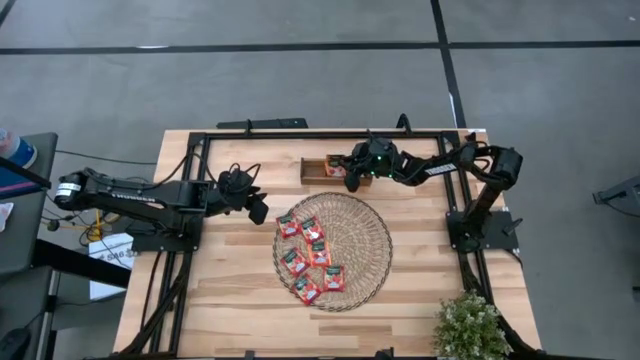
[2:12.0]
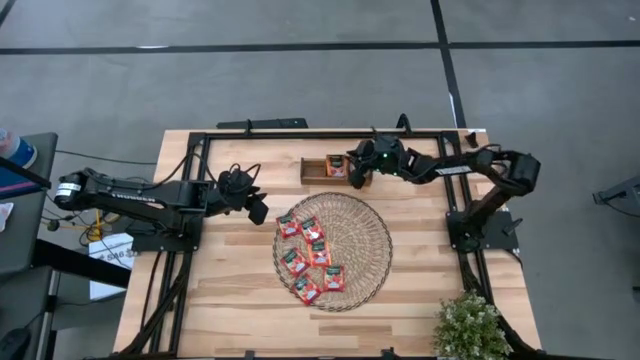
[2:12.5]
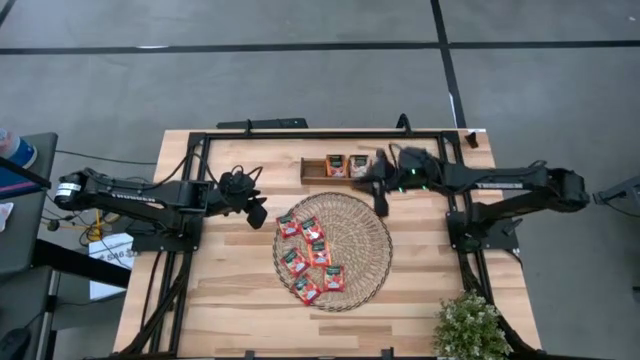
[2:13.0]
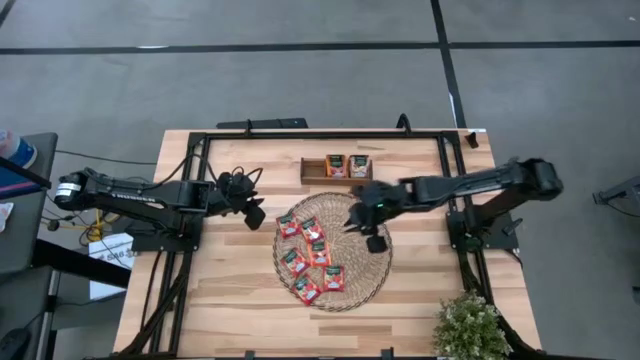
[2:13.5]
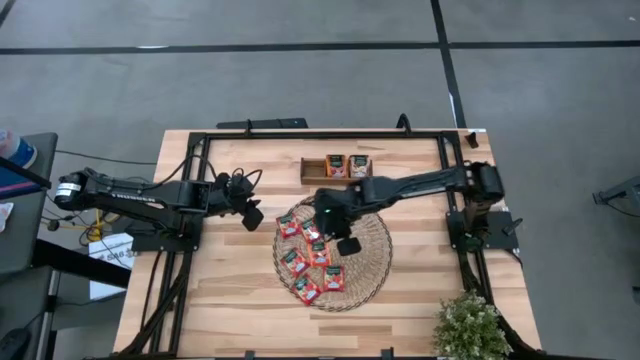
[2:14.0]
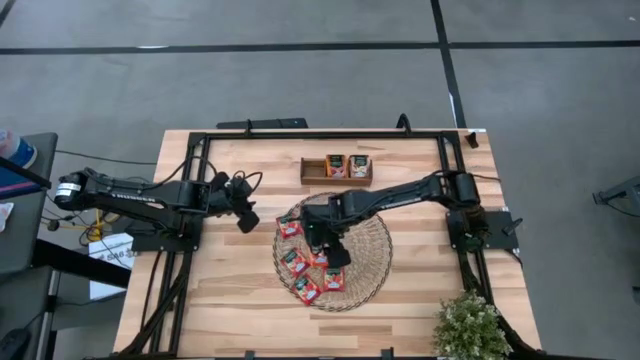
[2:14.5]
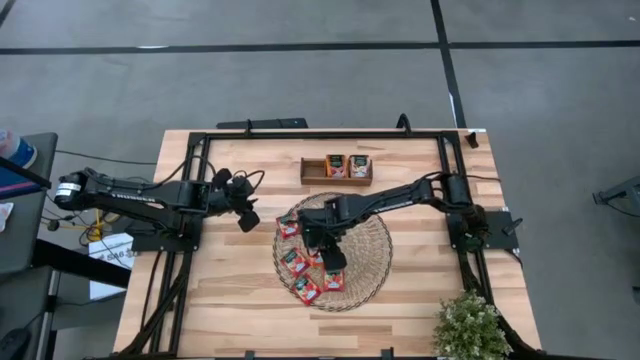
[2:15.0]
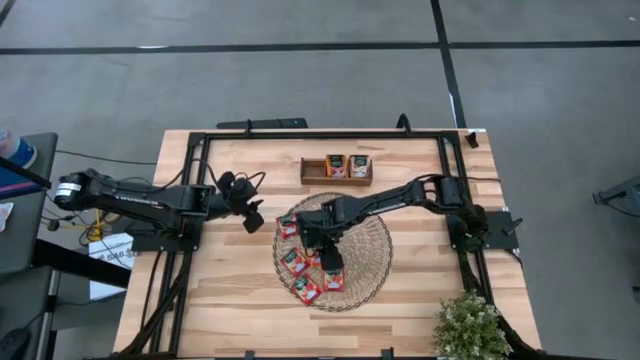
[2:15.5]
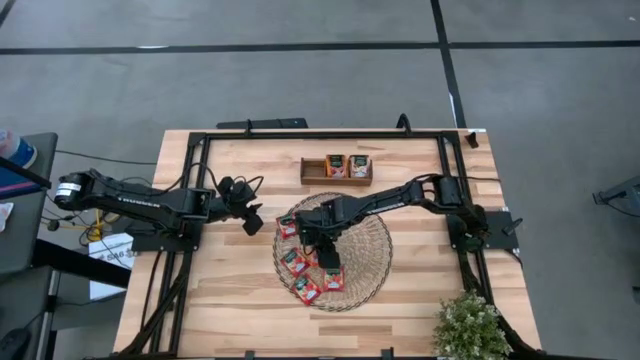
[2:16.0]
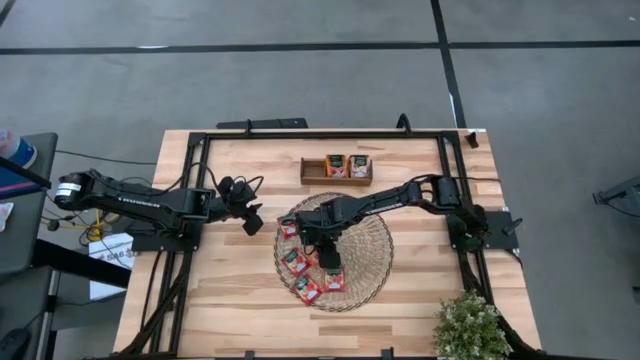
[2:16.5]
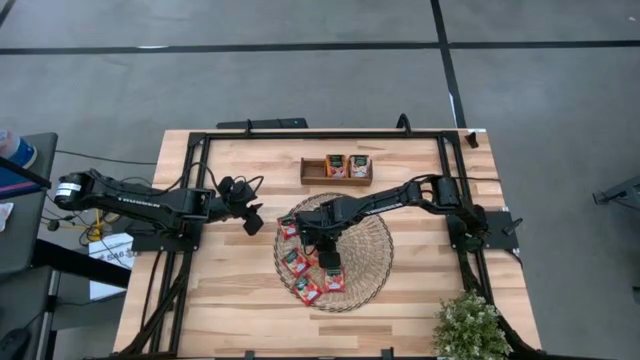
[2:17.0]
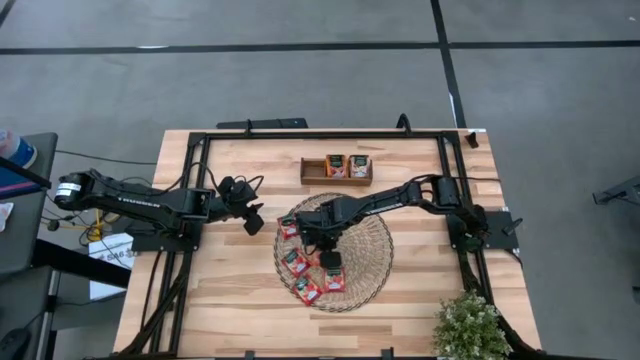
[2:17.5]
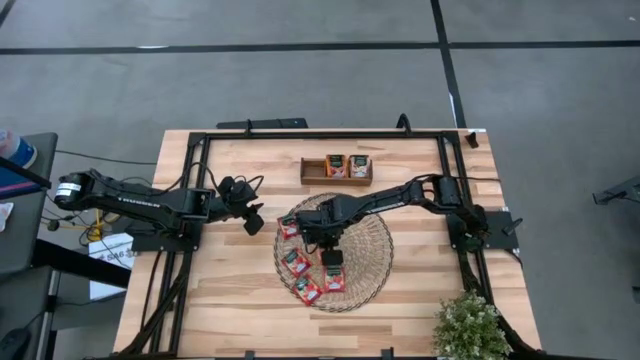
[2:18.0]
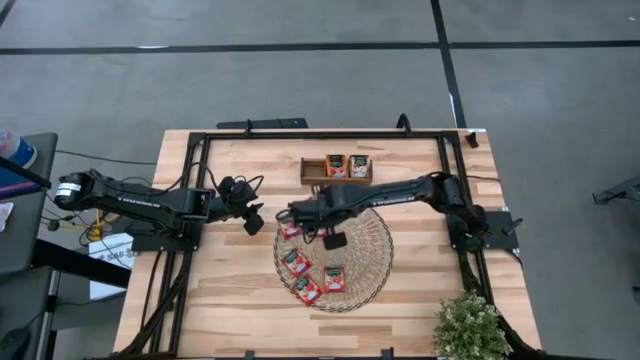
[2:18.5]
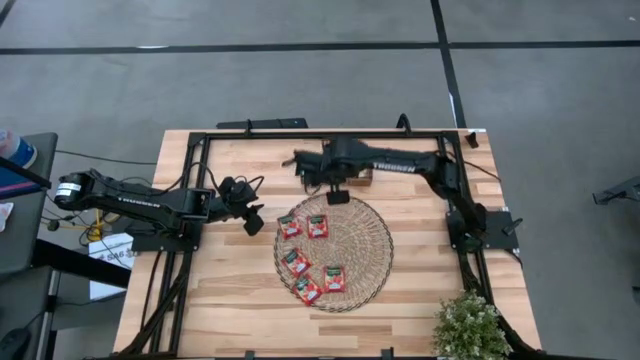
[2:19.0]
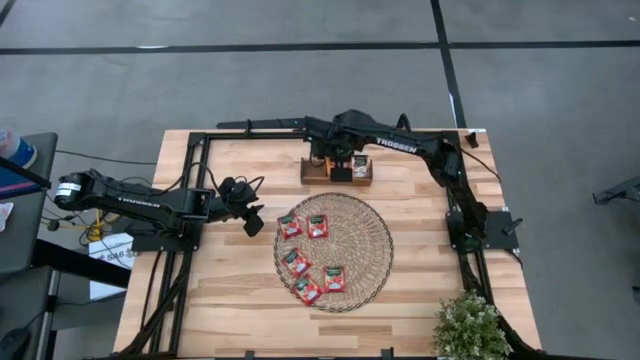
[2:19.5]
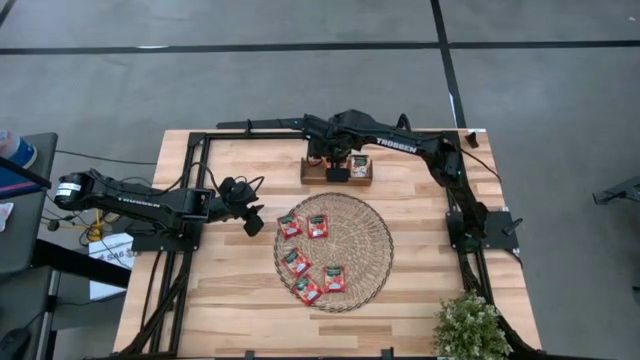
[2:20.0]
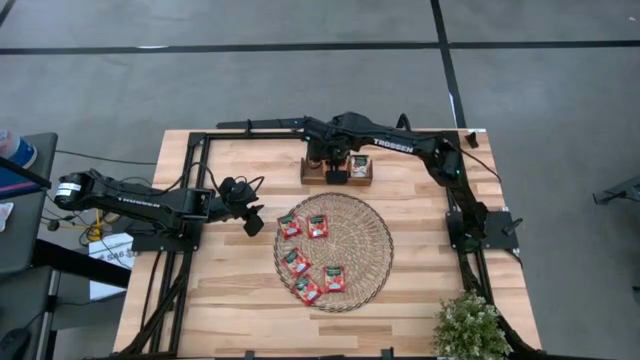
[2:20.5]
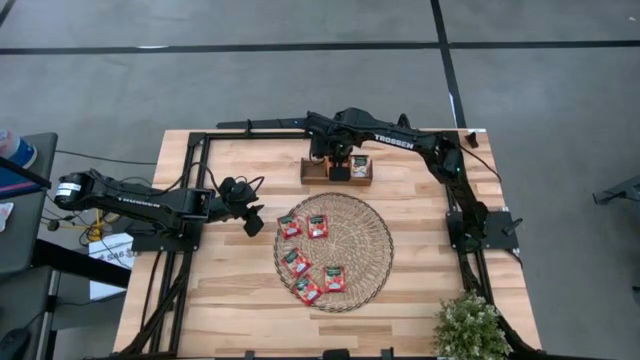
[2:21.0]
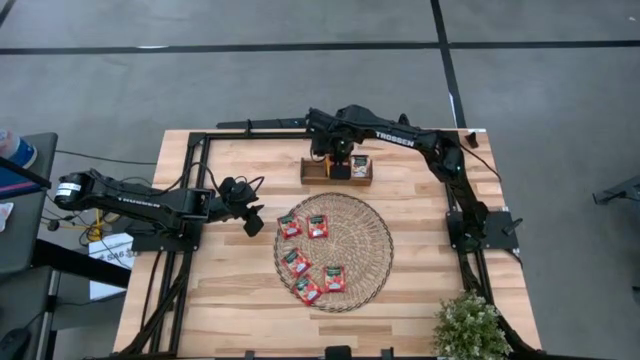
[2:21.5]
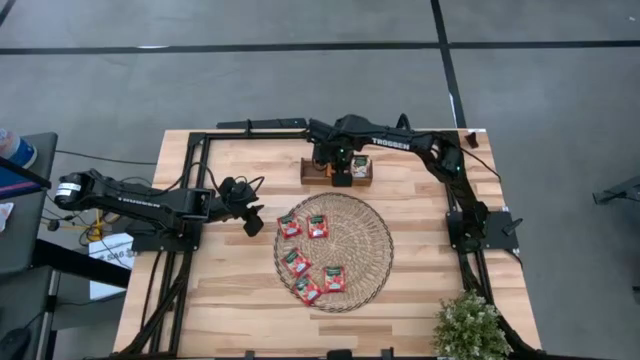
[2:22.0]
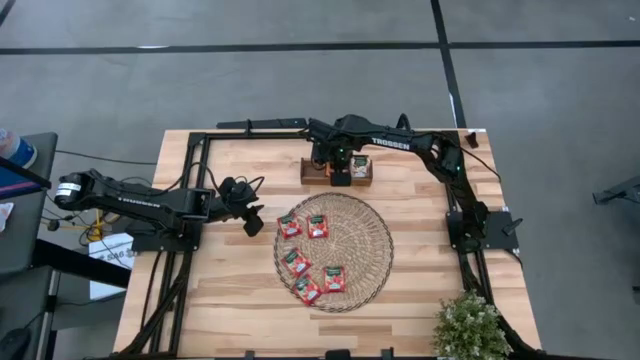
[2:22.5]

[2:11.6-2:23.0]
Task: Pick & Place Tea
Put the orange tea bag into the middle slot of the wooden organizer

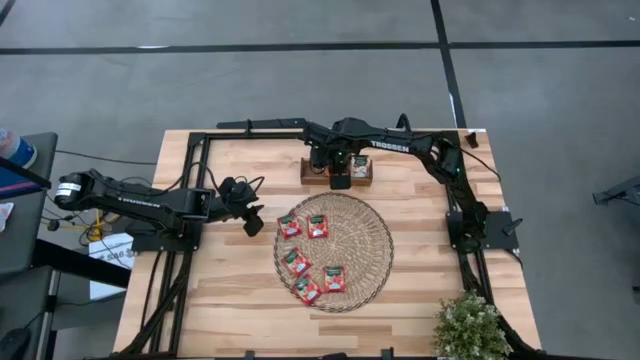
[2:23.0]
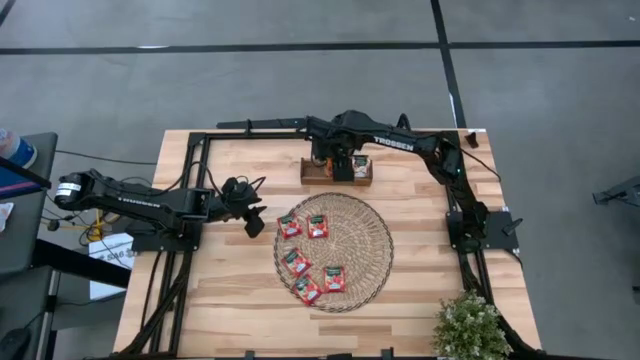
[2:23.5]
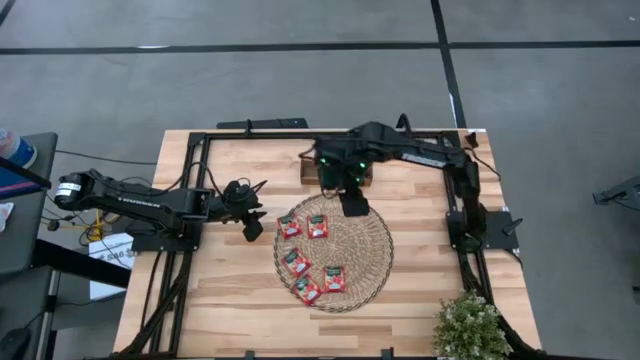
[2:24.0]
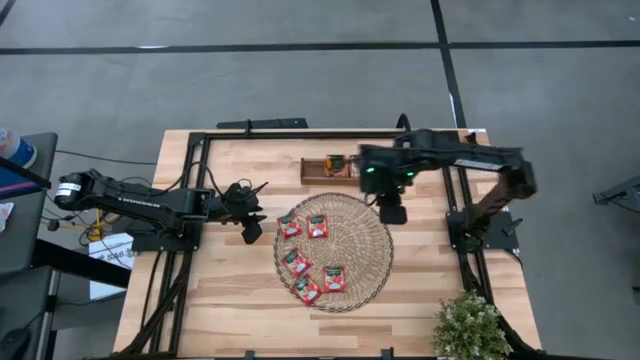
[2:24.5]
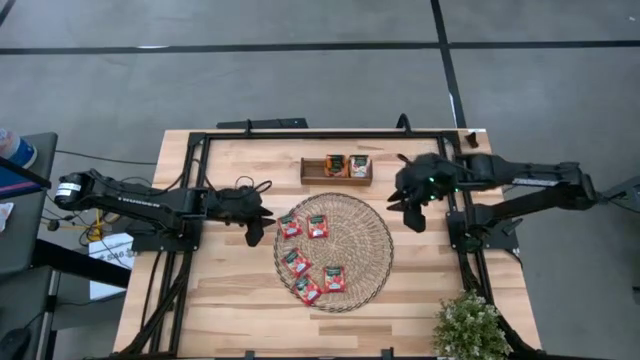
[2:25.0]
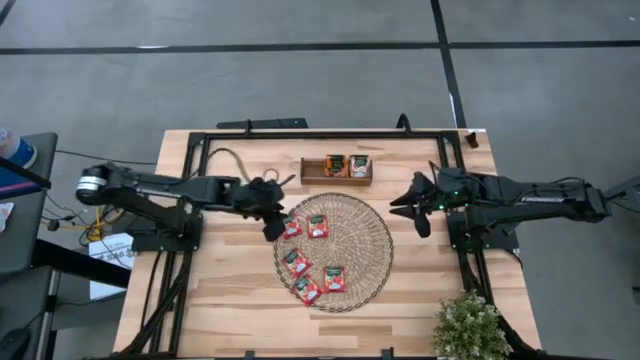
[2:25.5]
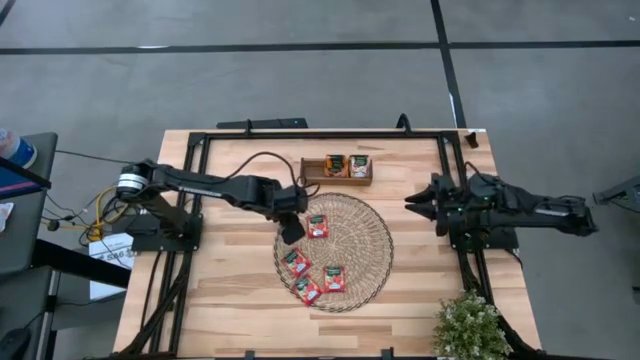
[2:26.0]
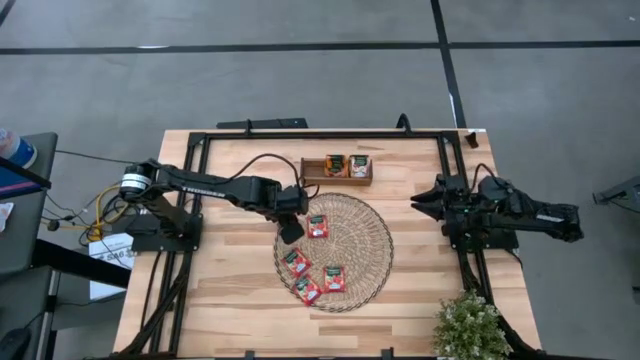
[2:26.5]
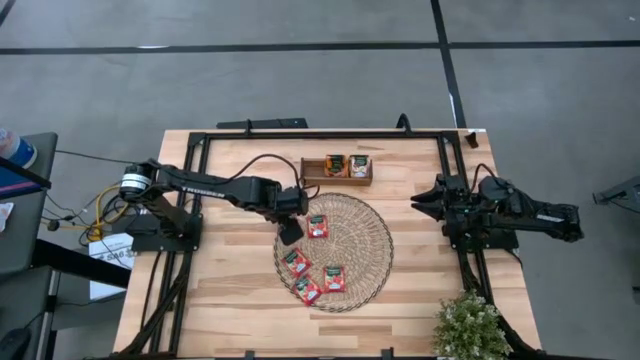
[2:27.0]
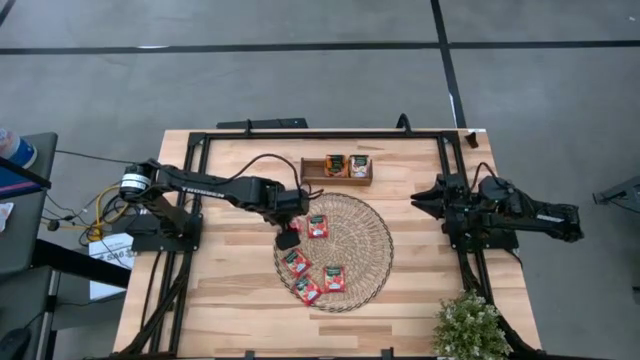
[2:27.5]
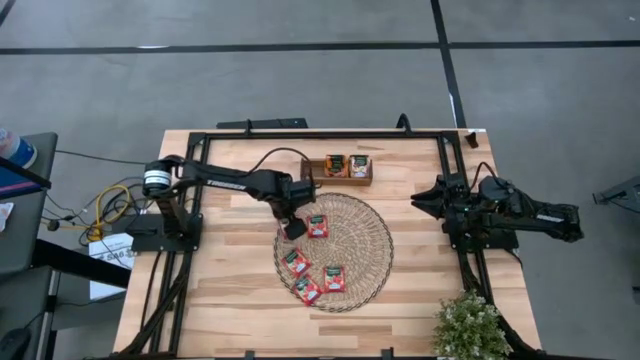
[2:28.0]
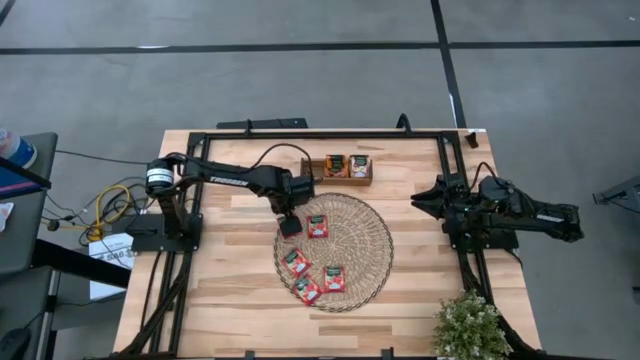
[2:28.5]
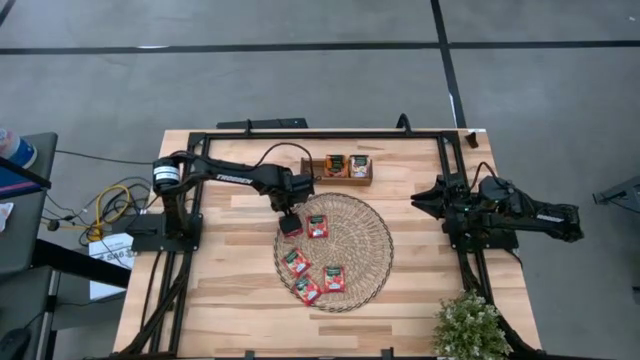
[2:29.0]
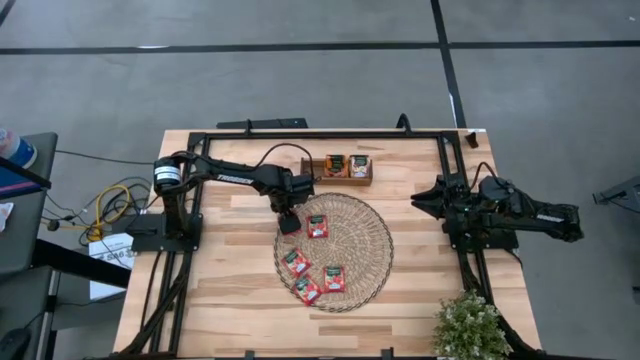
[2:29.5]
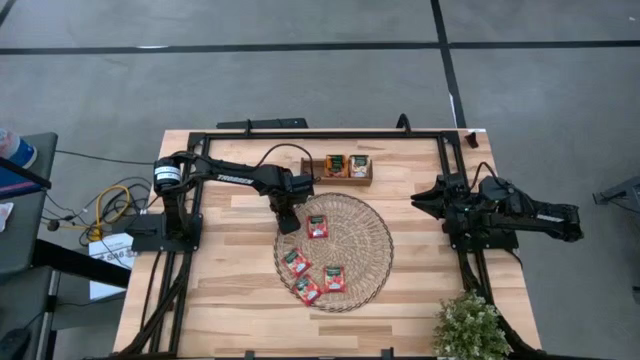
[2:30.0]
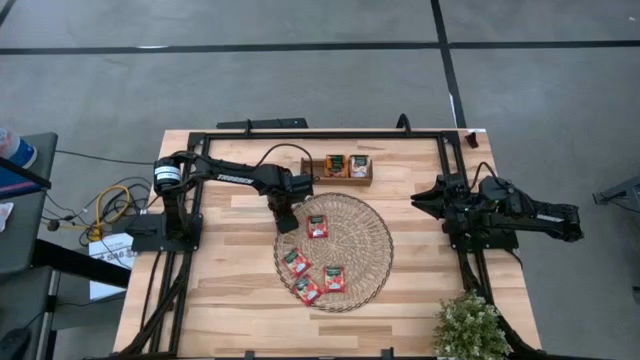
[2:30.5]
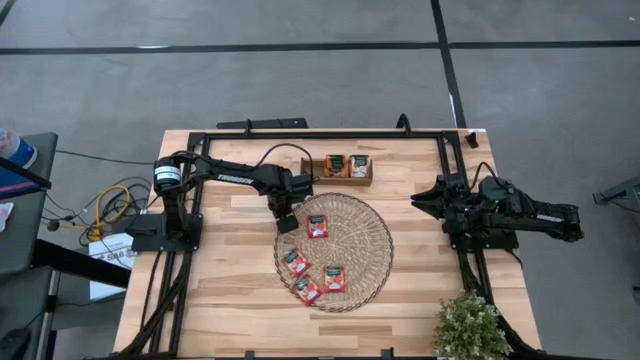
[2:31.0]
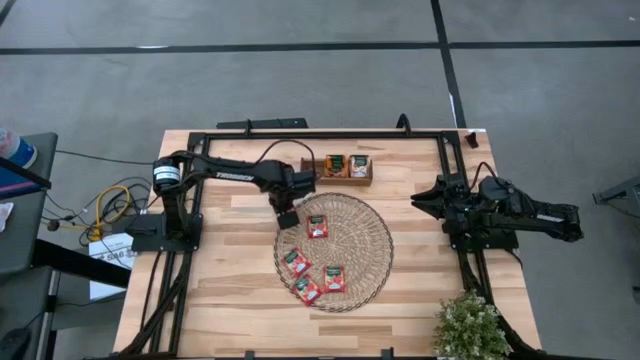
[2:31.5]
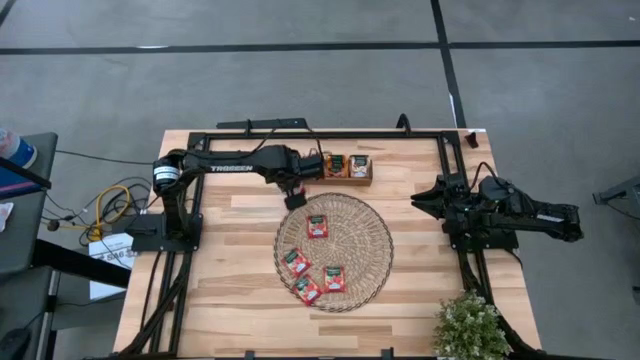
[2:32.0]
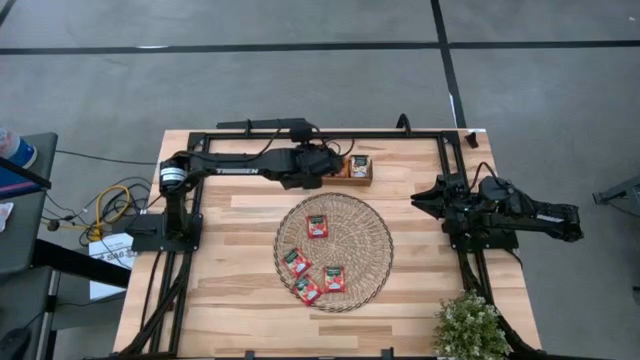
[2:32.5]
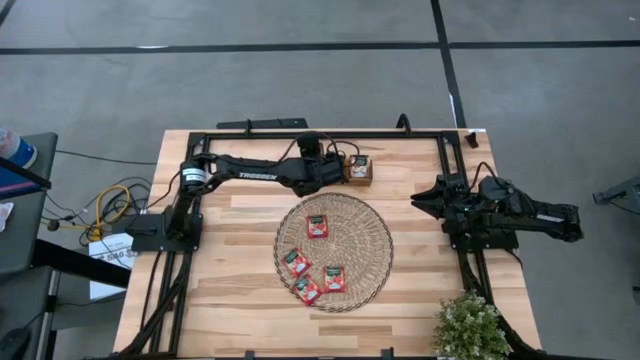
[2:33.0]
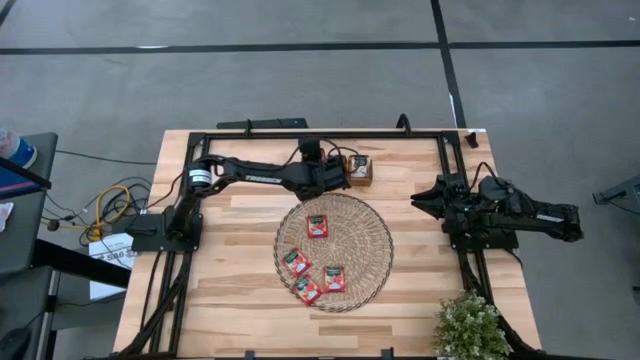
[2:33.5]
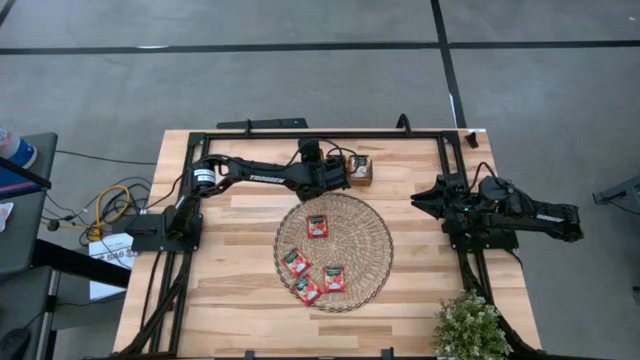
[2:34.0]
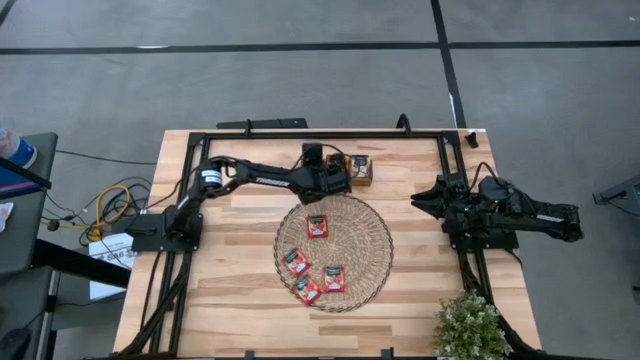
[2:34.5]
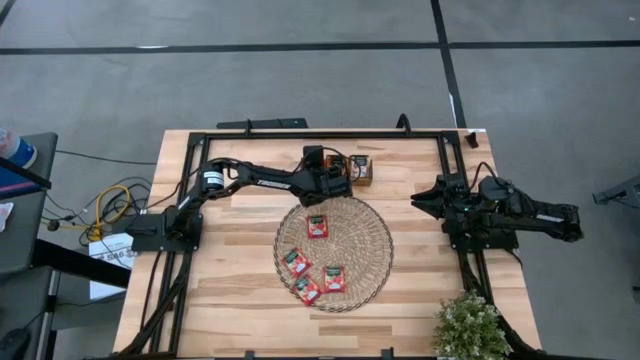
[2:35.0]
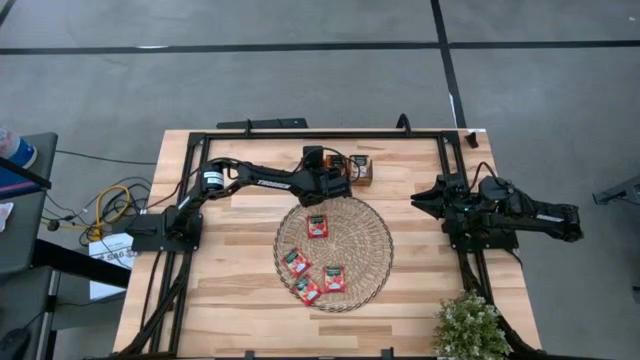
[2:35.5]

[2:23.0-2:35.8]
Put the red tea bag into the left slot of the wooden organizer
